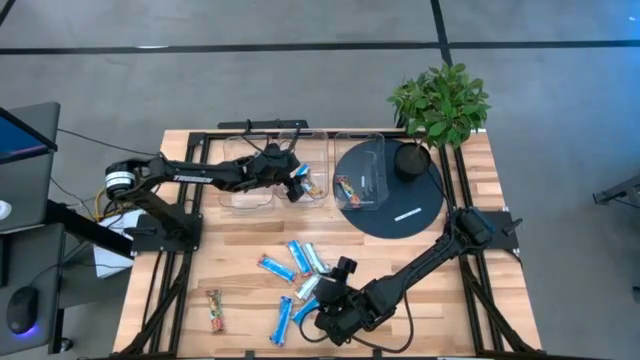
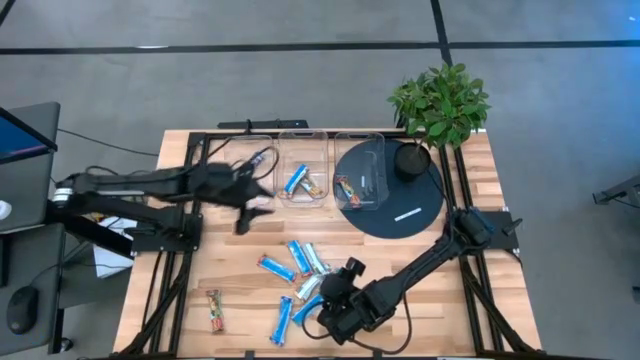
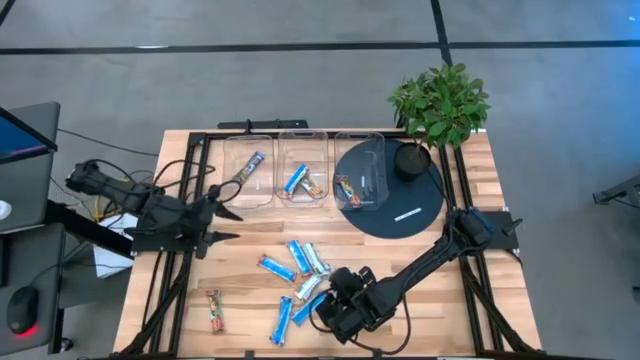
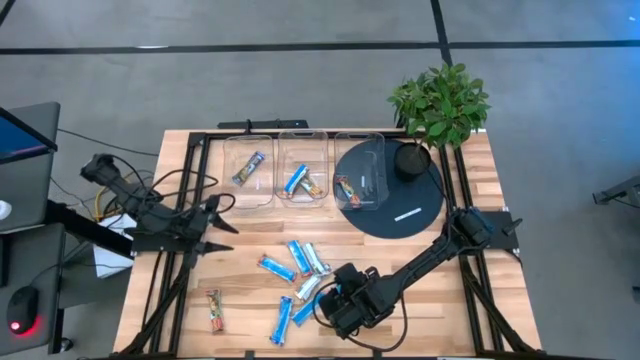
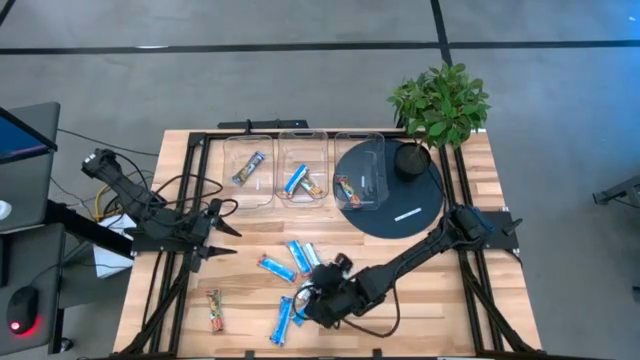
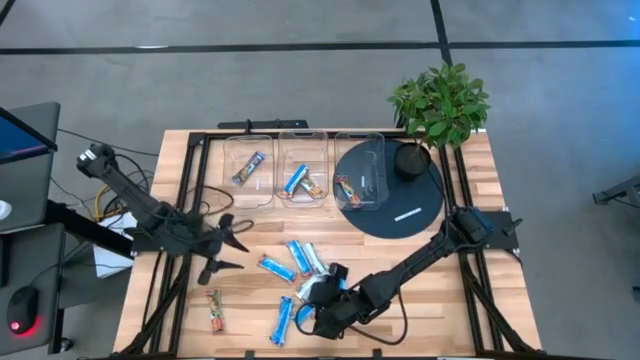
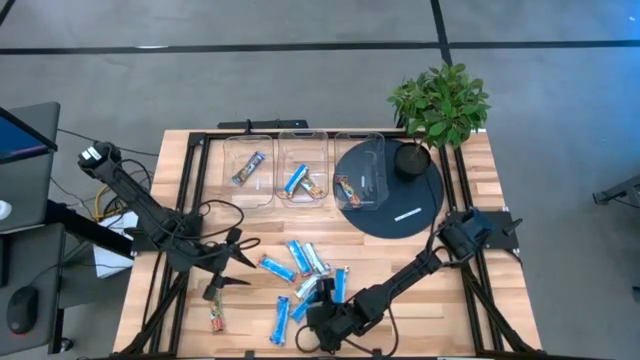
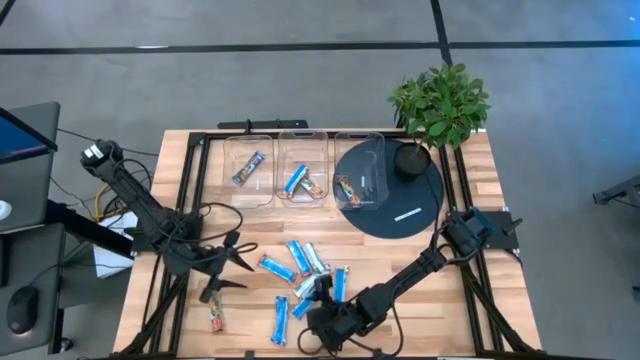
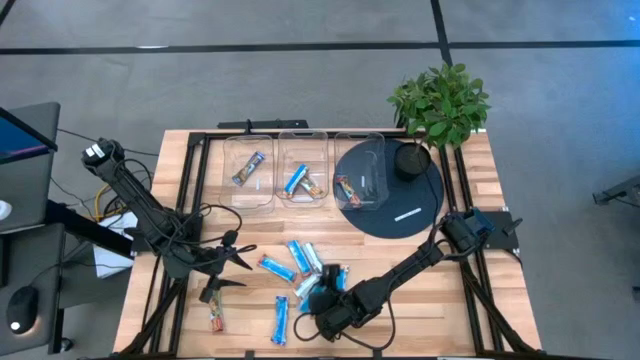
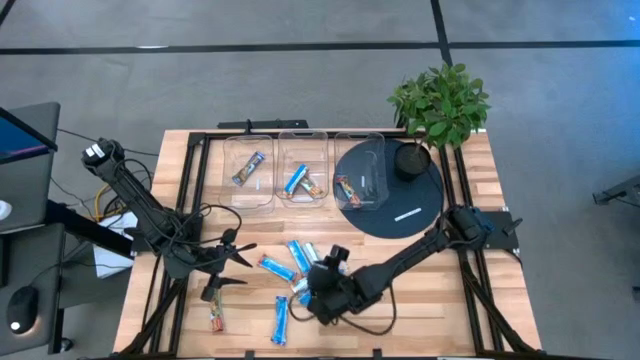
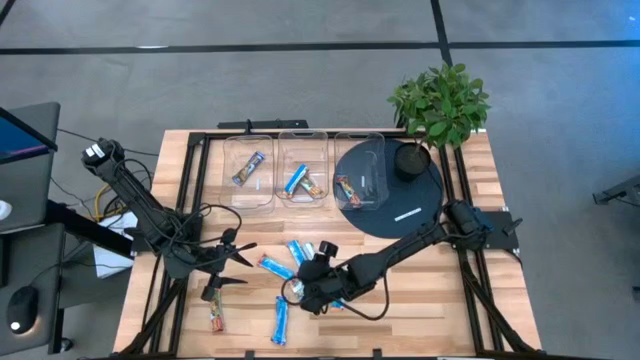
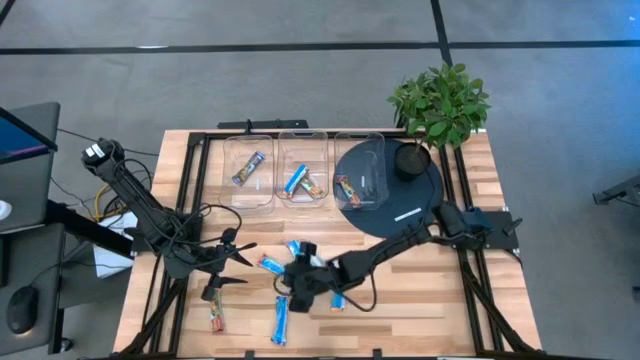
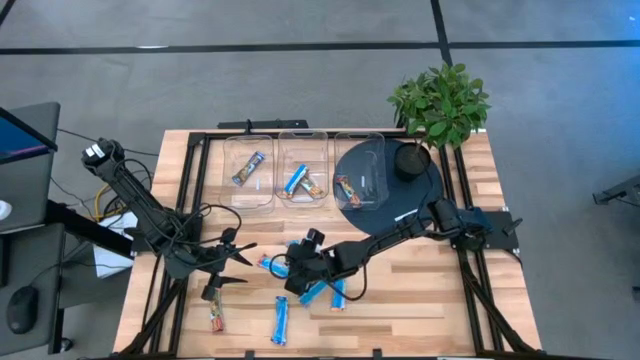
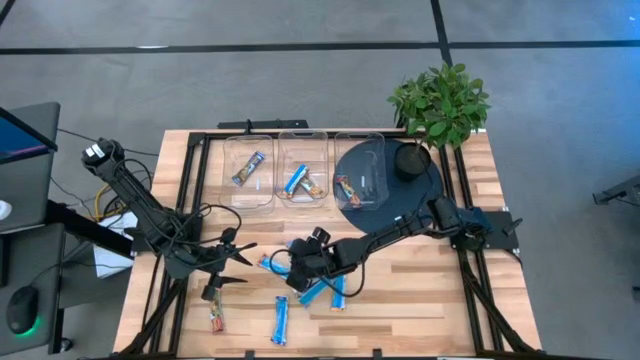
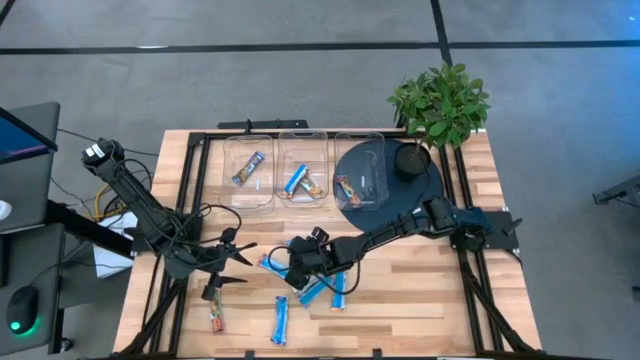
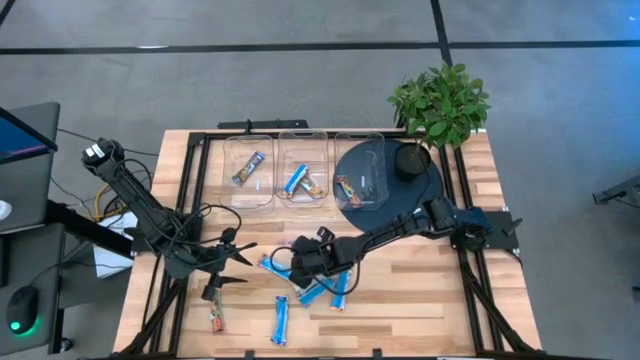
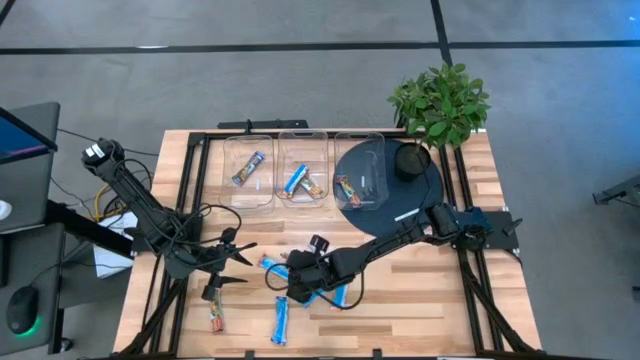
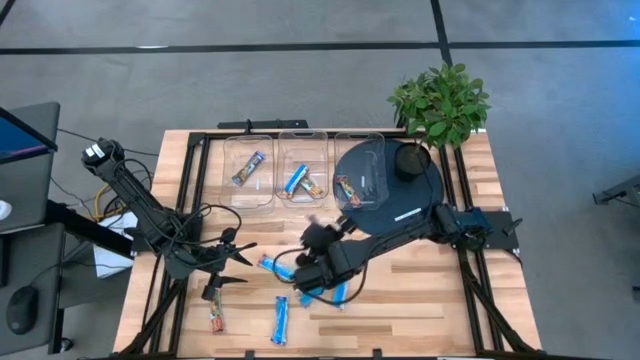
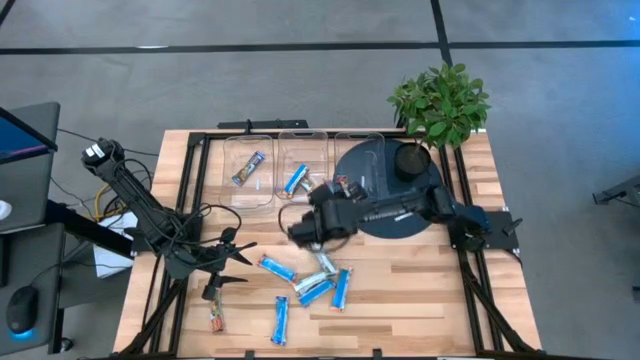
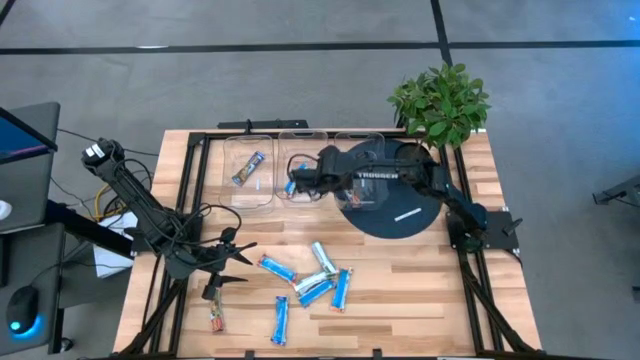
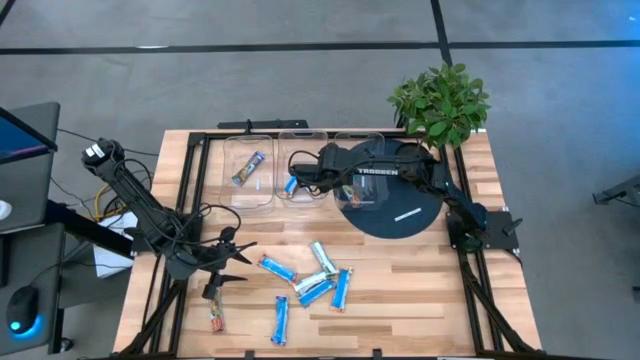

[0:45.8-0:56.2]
Task: Pick and place Granola Bars by type
Put the red granola bar into the right transparent bin

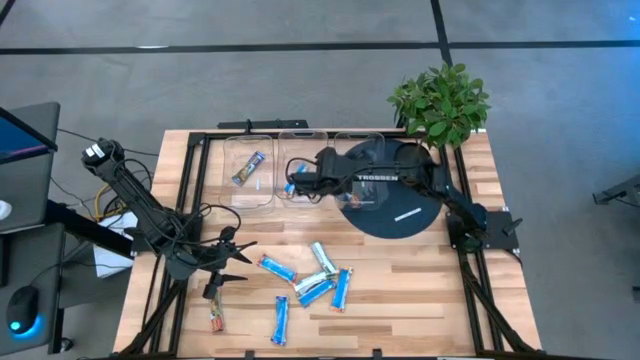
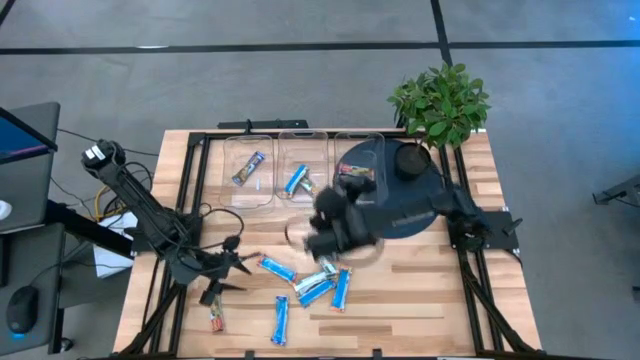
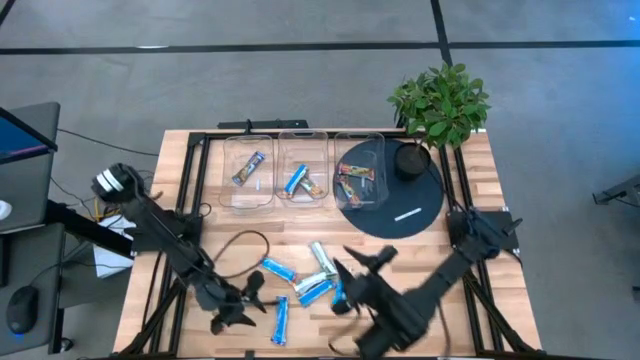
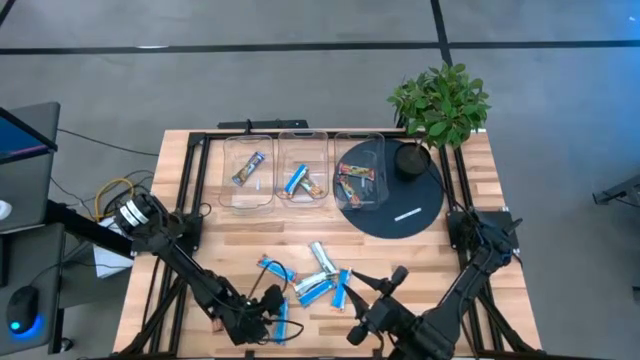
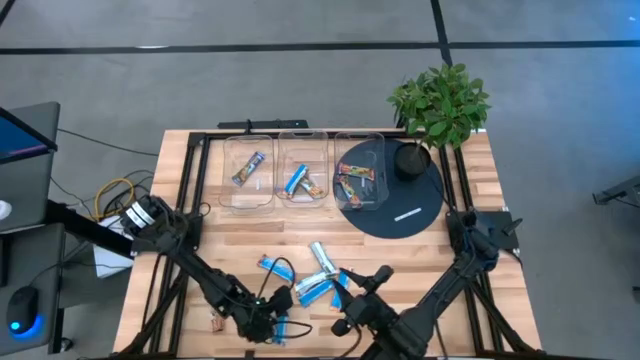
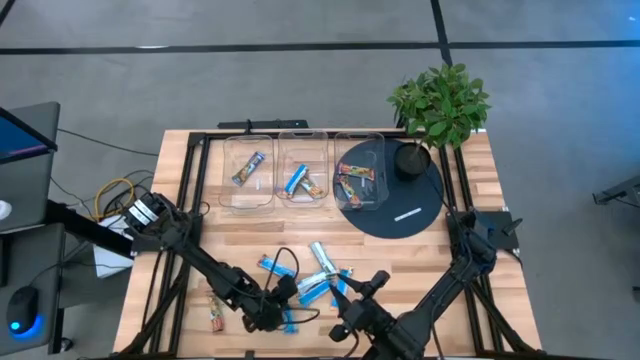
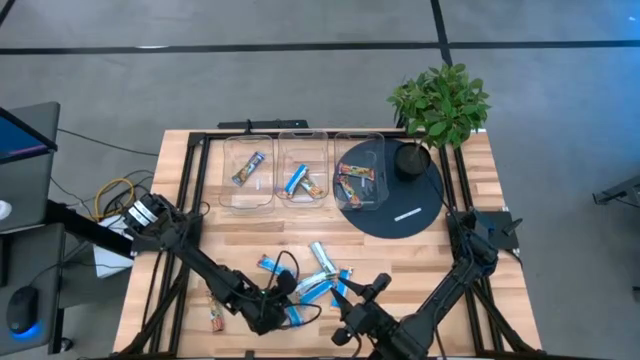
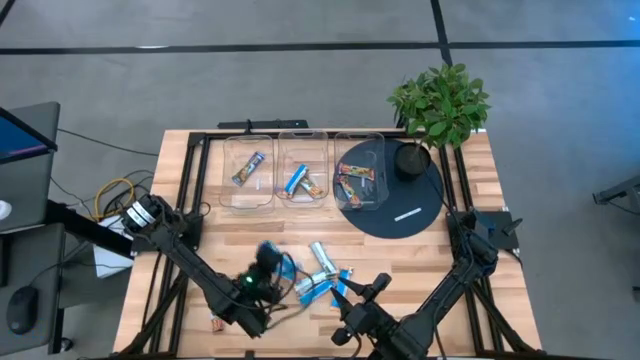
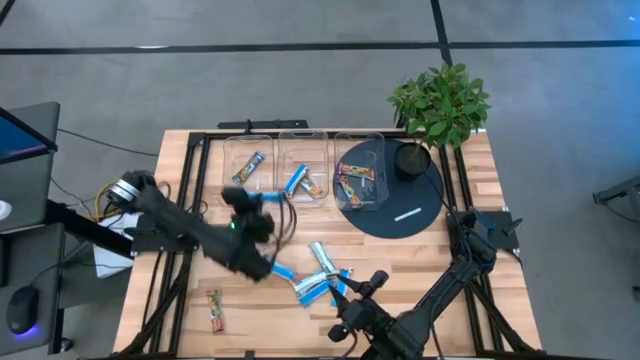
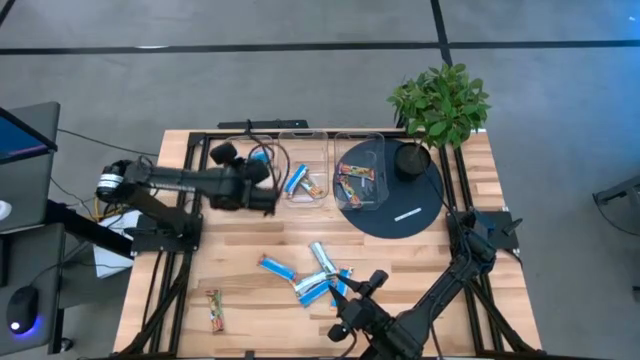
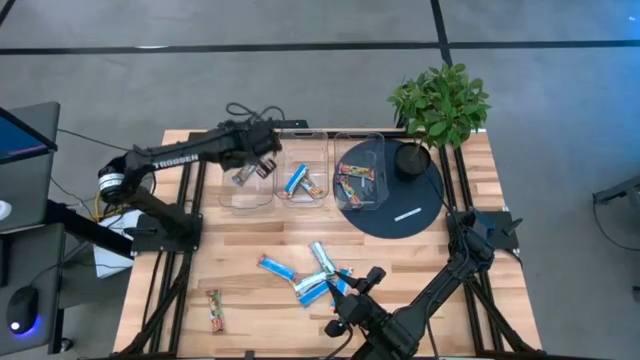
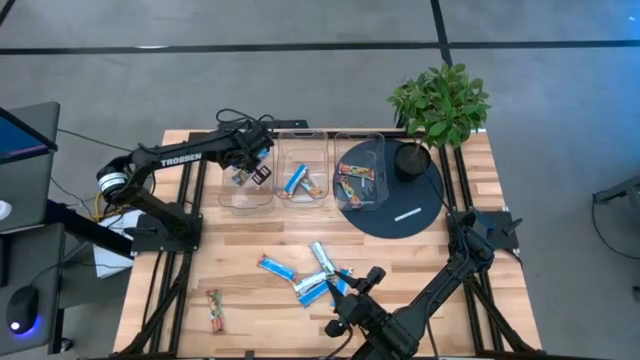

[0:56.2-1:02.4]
Put the blue granola bar into the left transparent bin

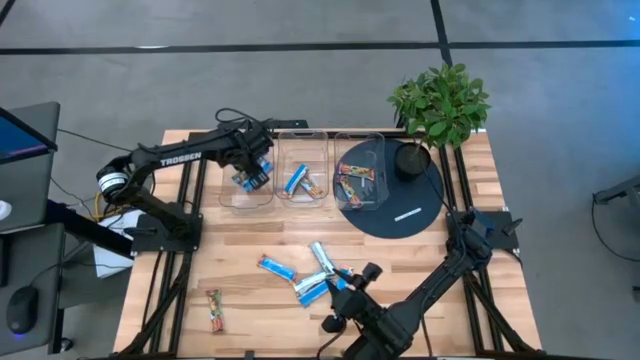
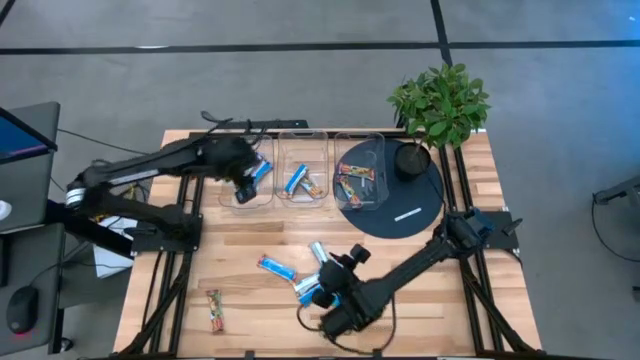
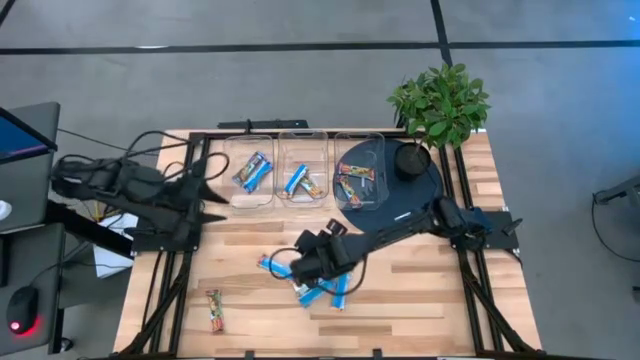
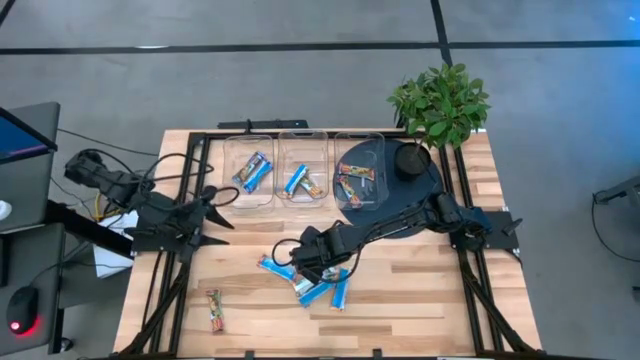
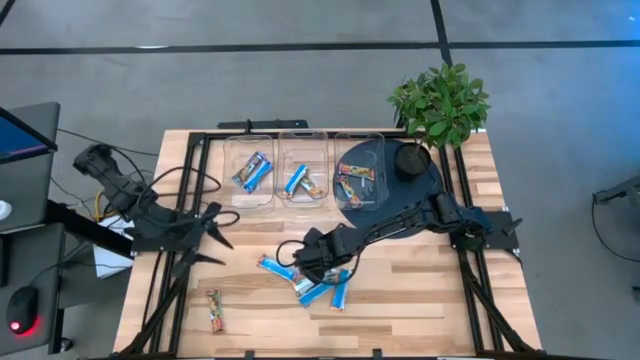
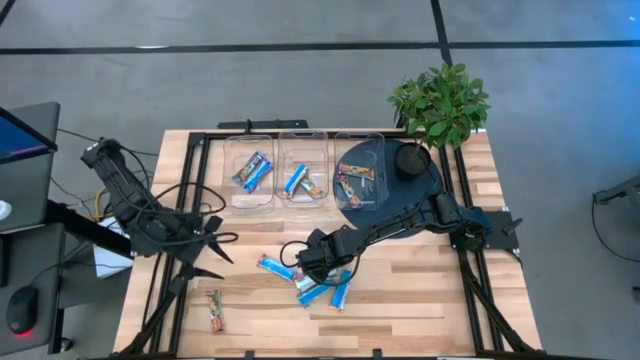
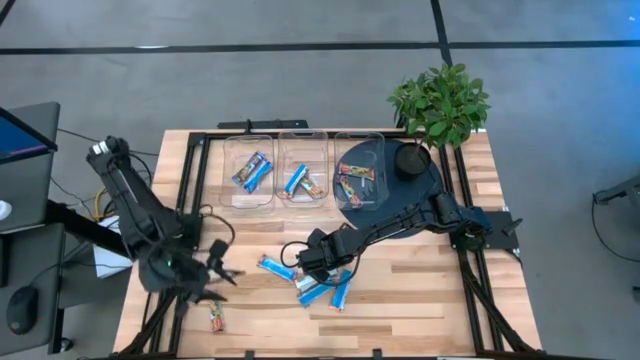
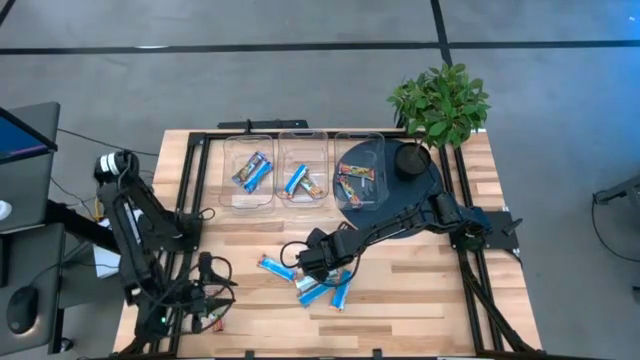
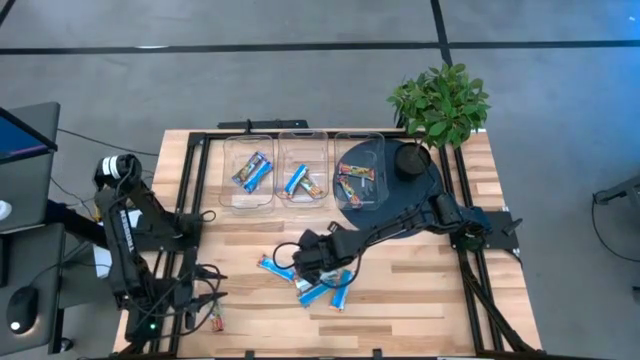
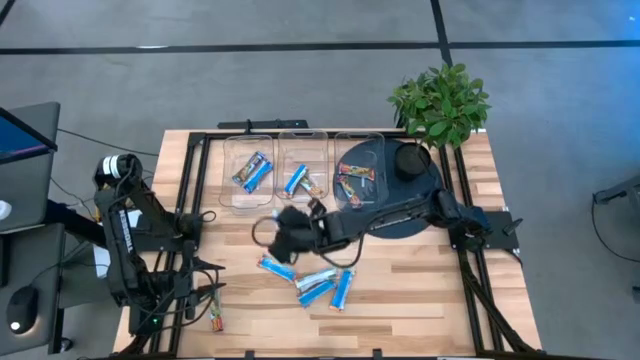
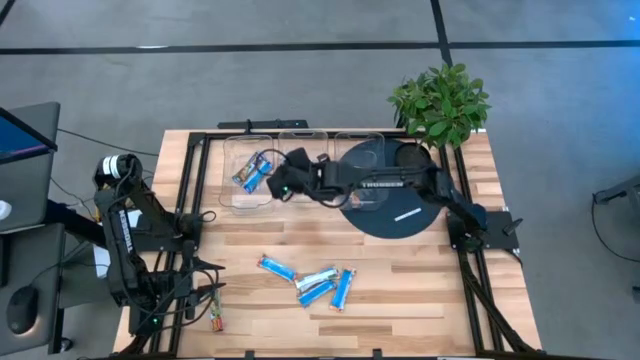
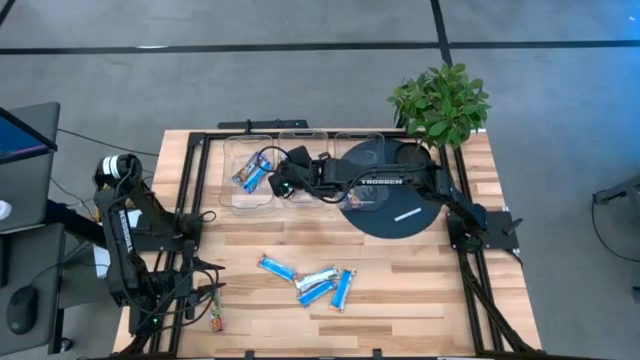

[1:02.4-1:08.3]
Put the orange granola bar into the middle transparent bin
